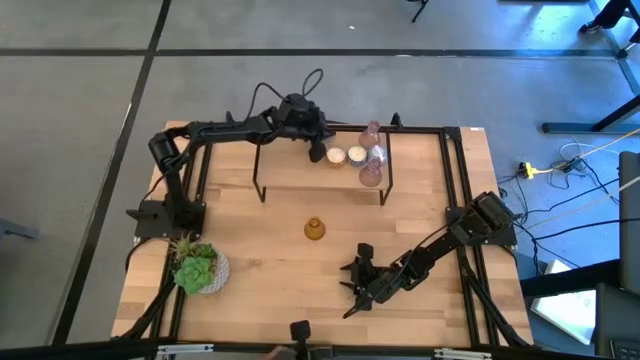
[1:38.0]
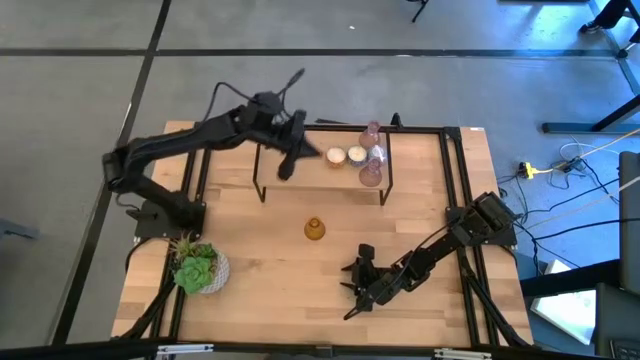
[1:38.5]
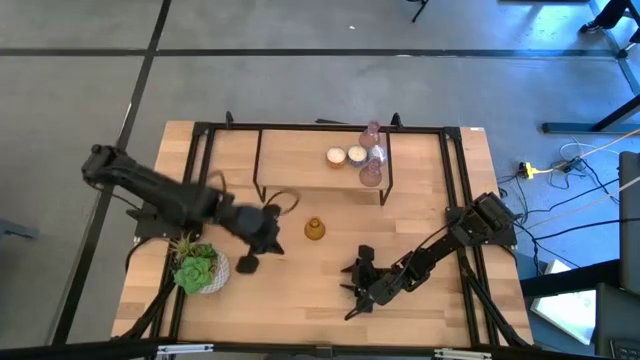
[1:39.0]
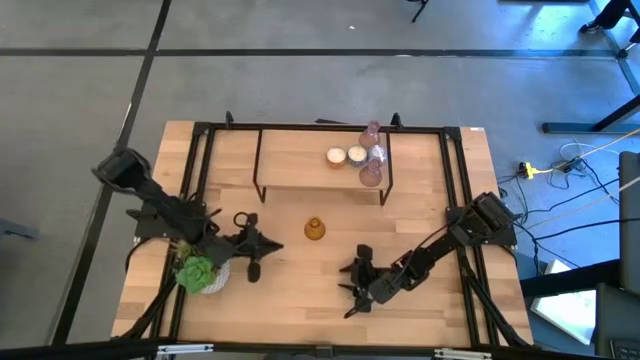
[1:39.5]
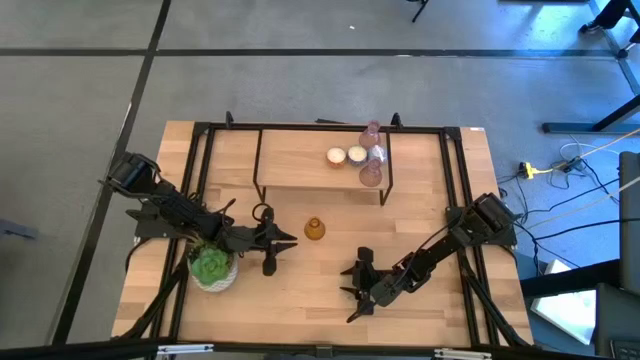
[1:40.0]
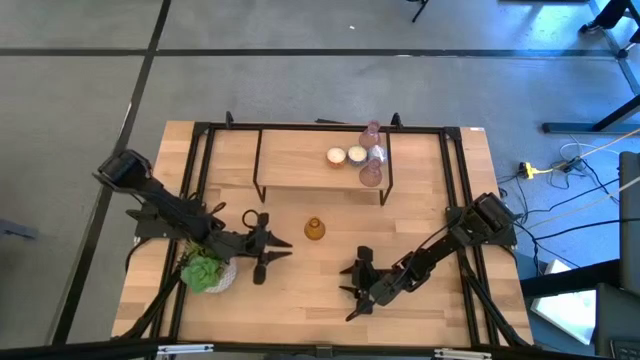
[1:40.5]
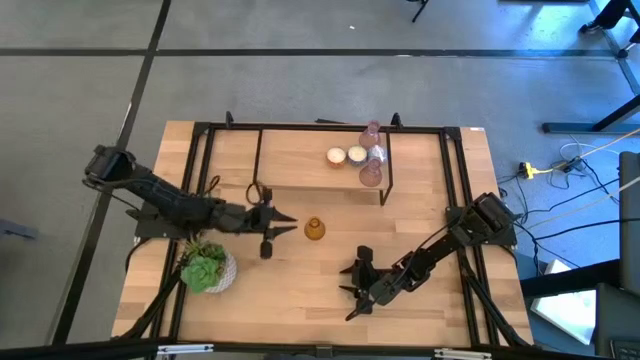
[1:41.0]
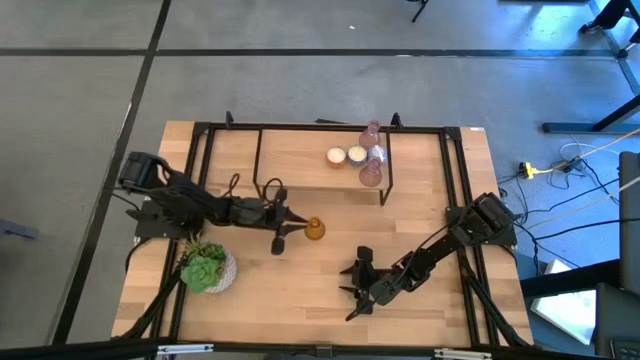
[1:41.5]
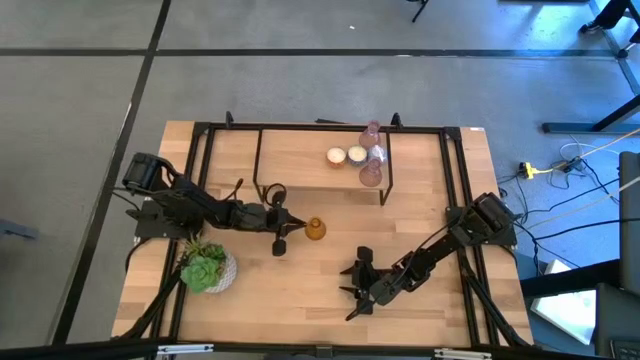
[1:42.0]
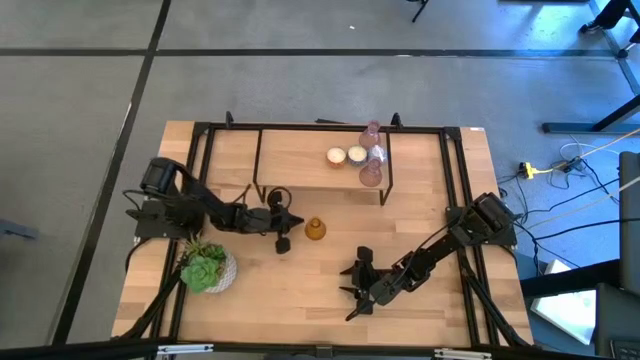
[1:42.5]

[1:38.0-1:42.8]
Task: Pick & Place candle stick holders
Put the yellow glass candle holder on the shelf

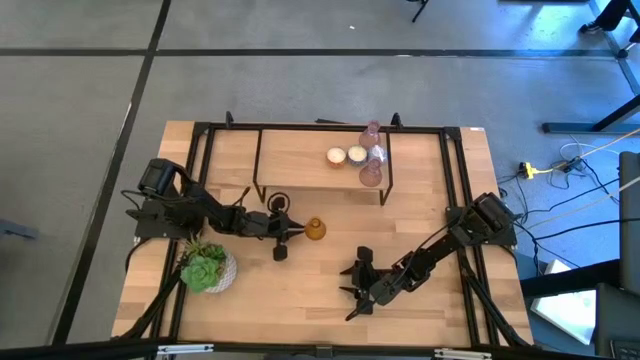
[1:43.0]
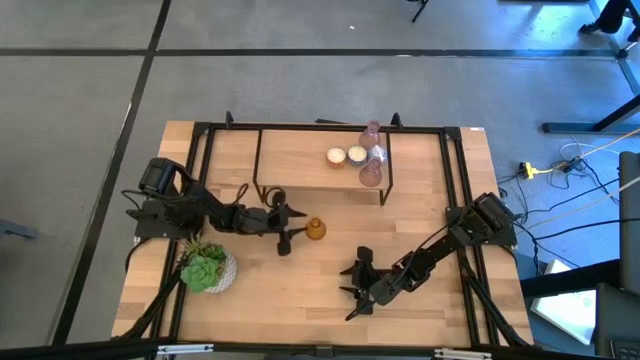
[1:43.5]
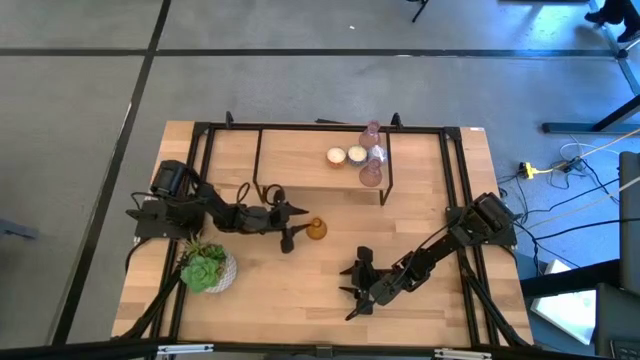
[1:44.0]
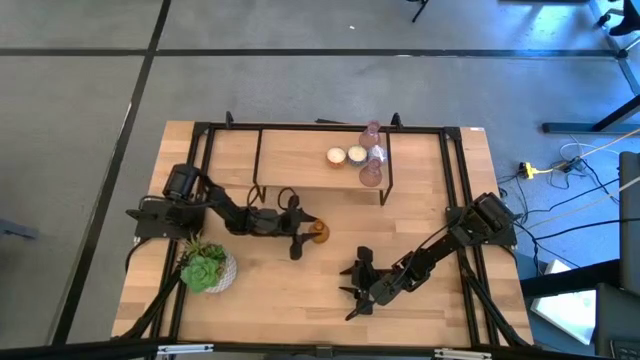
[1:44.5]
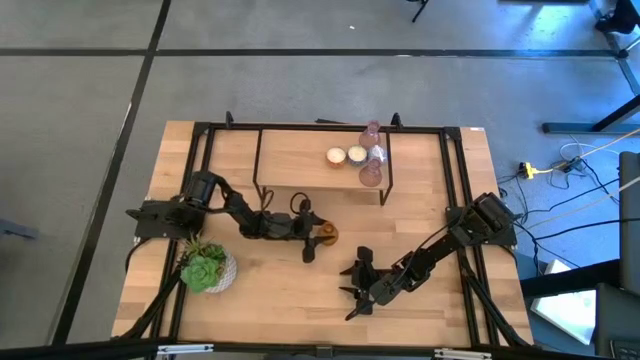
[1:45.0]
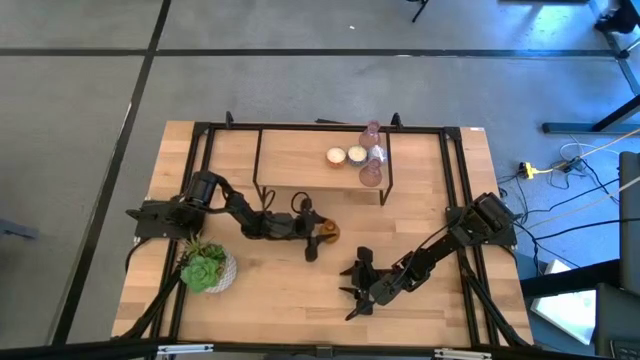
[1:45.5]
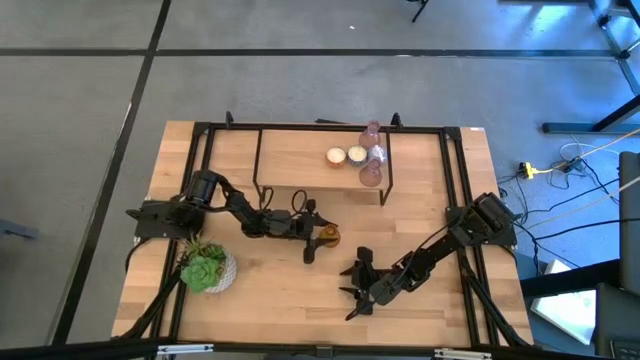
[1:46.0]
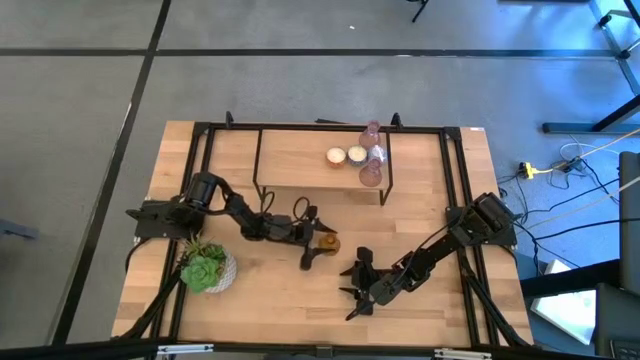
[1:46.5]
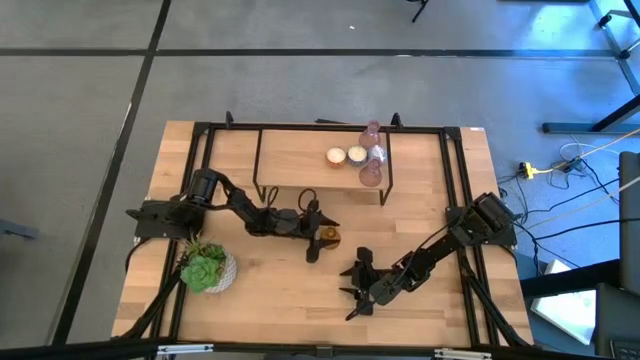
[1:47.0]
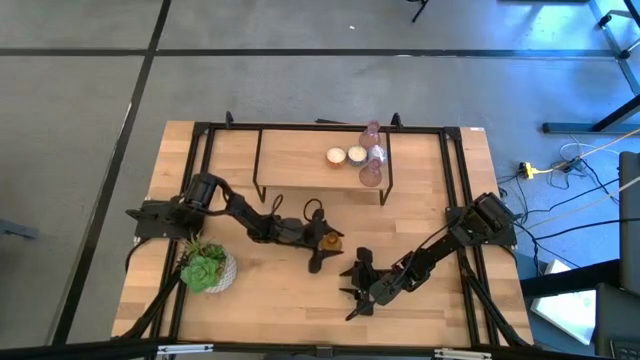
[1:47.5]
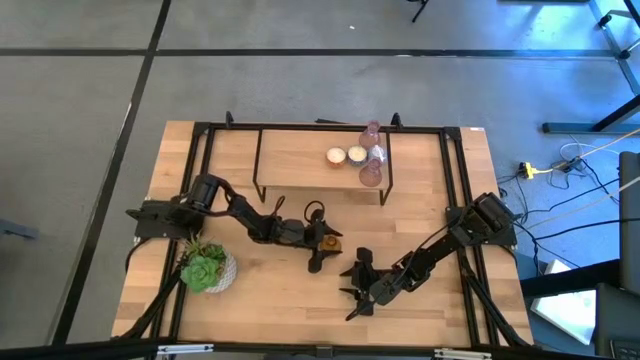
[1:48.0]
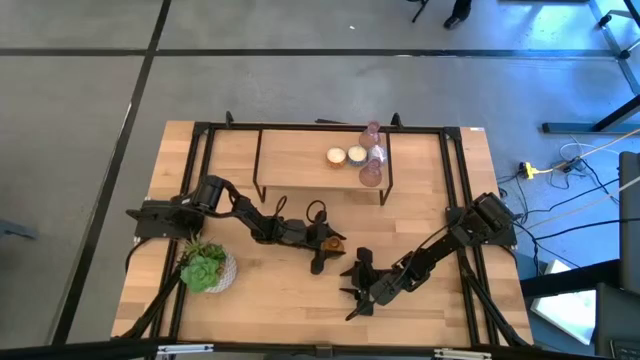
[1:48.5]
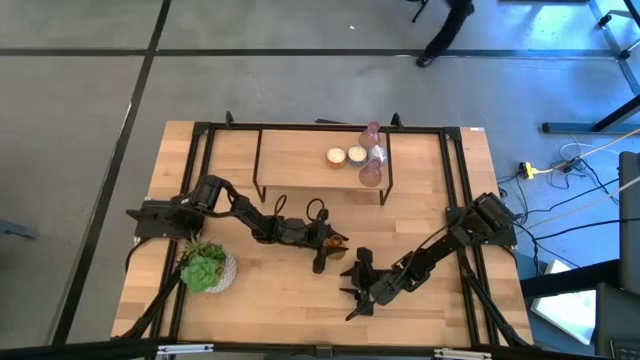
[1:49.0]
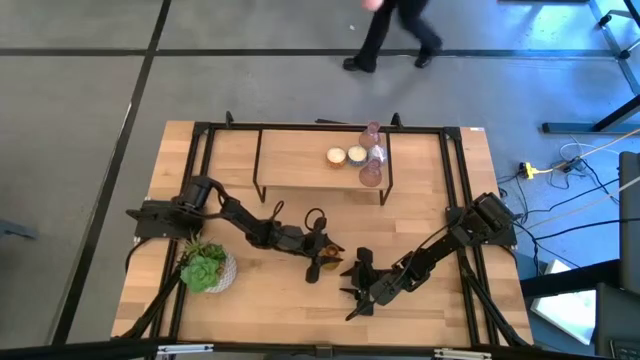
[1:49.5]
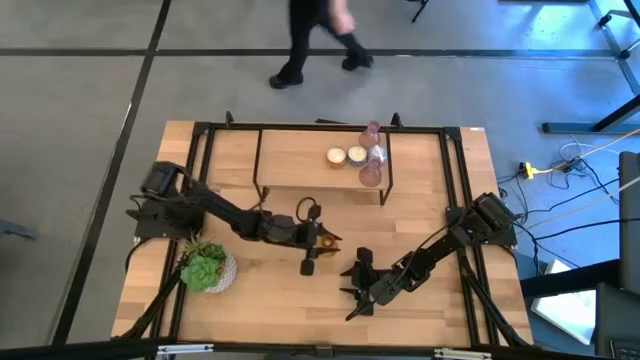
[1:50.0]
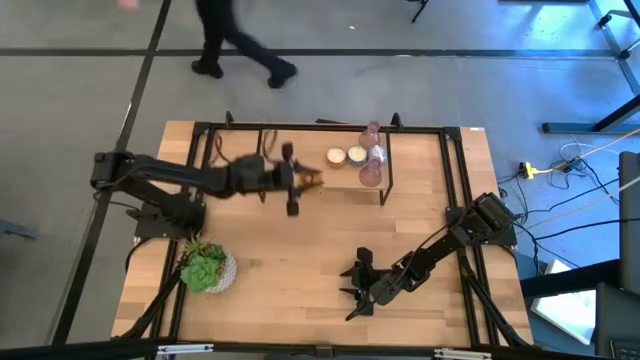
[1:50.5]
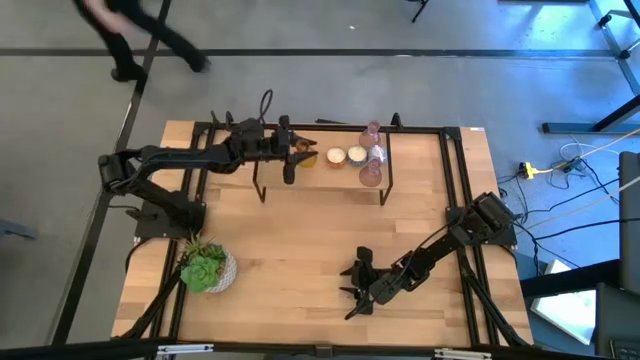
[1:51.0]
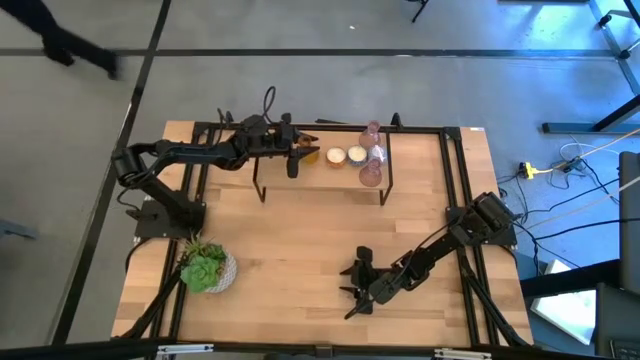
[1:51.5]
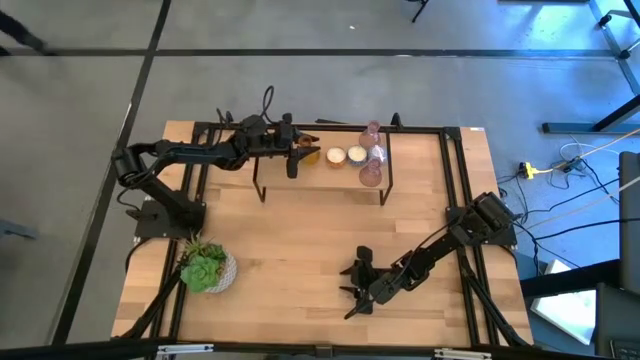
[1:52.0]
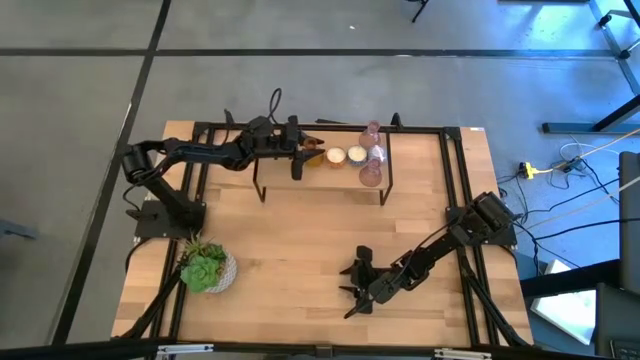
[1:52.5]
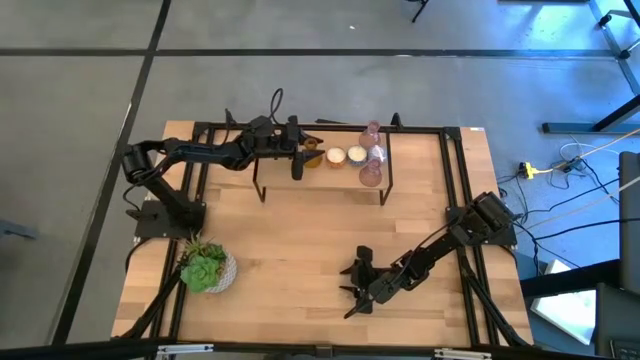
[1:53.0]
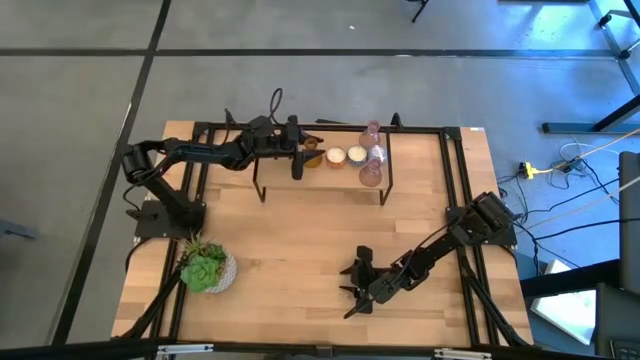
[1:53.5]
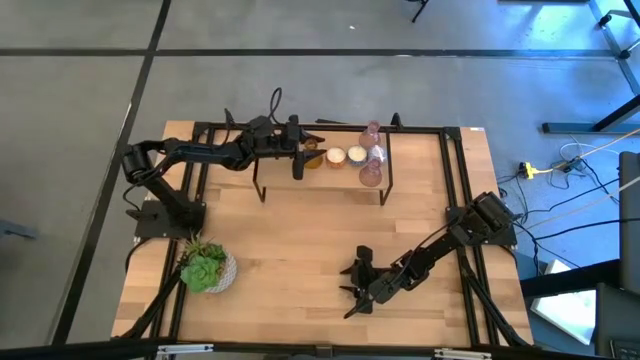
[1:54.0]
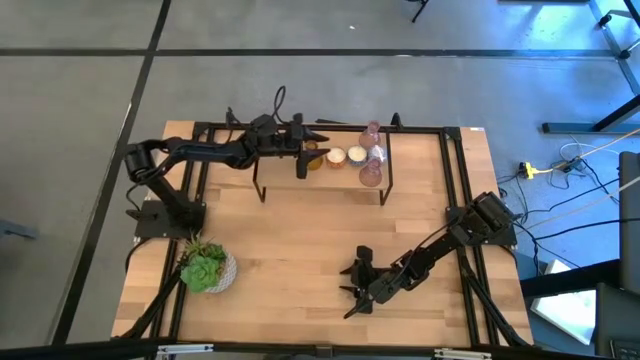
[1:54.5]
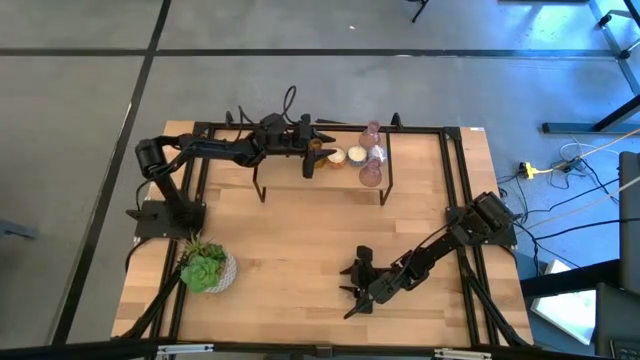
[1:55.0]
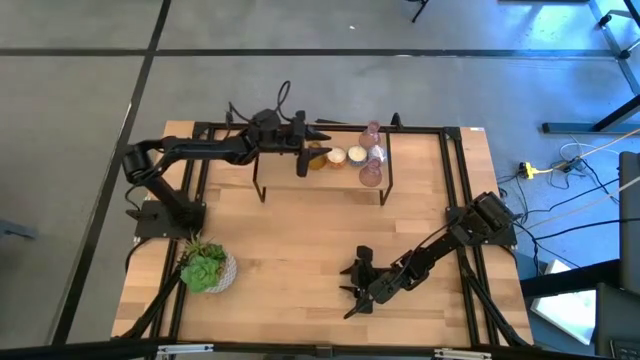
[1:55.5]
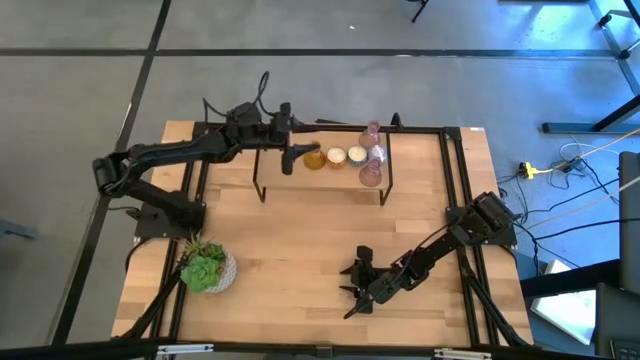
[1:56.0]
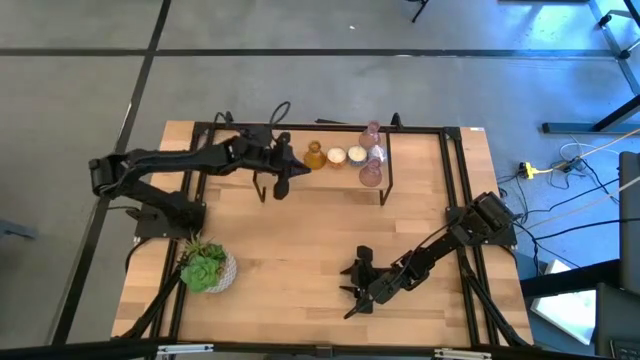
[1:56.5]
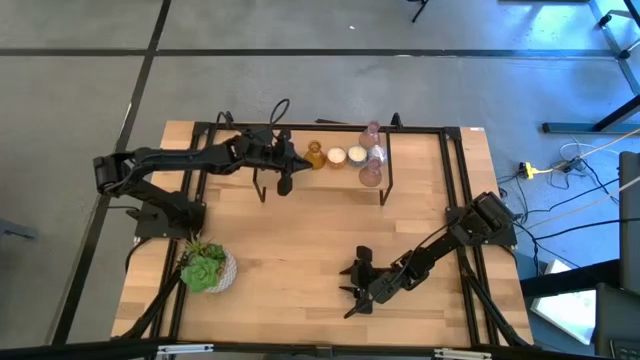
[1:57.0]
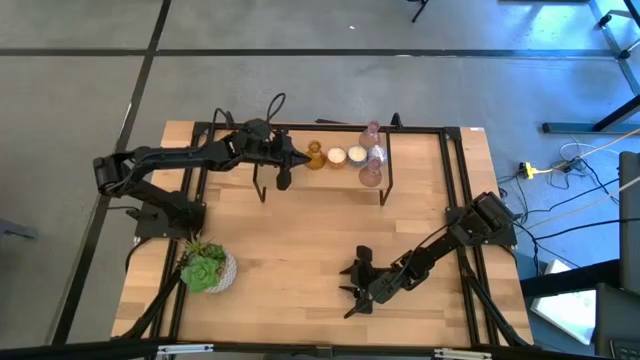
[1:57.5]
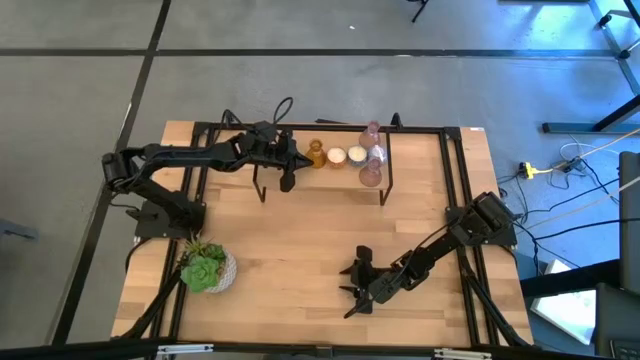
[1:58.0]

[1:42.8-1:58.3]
Put the yellow glass candle holder on the shelf

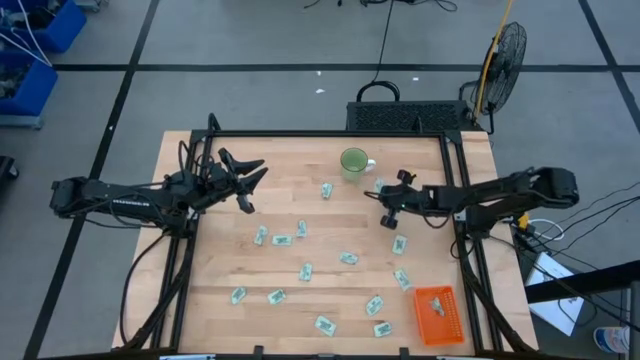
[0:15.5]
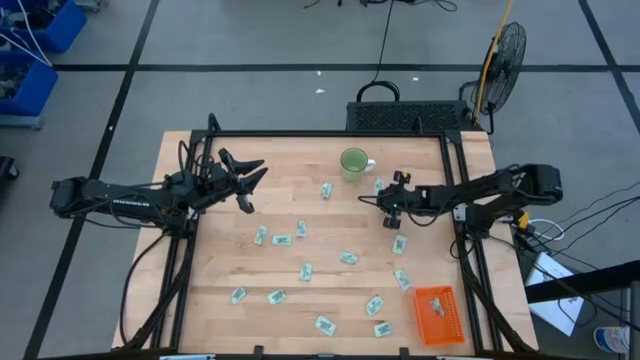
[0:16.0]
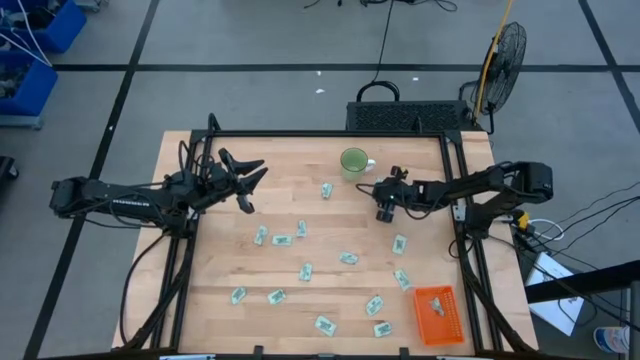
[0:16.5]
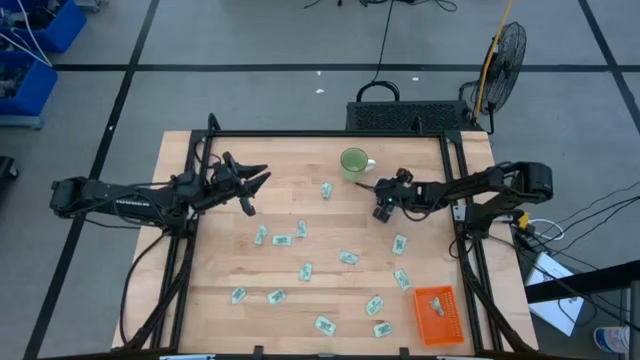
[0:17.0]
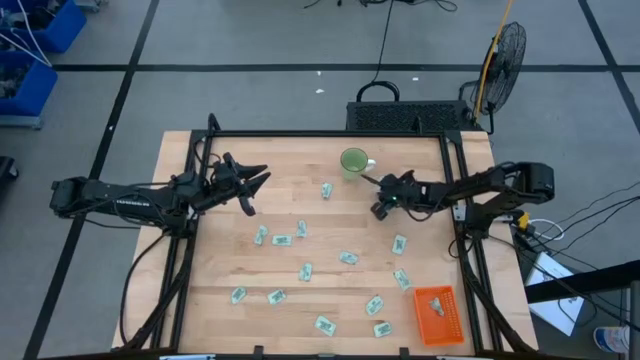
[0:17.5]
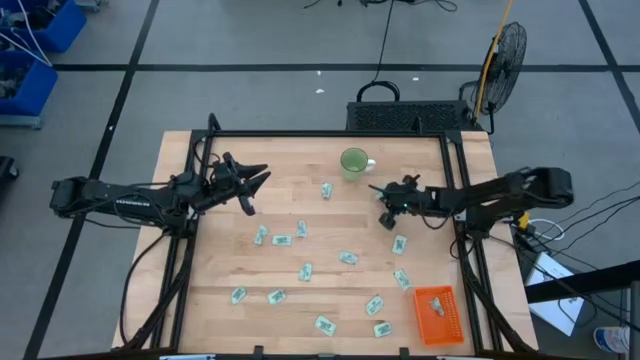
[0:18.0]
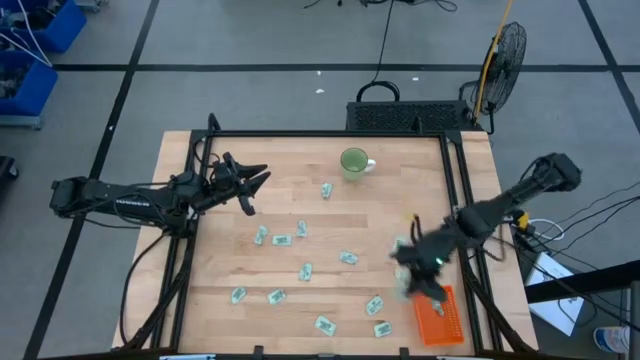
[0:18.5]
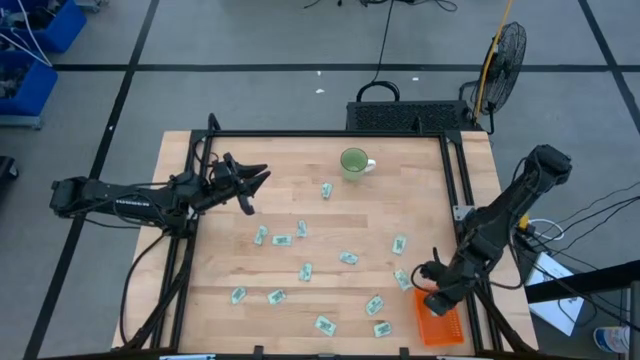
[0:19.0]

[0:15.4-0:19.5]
Task: Pick and place Stevia / Truvia into bins
Put the stevia packet into the orange bin
